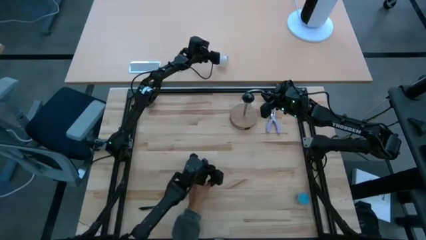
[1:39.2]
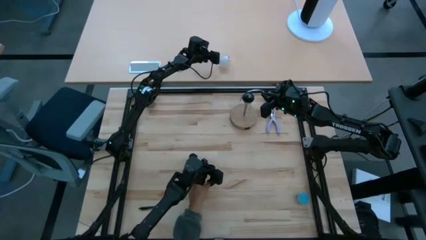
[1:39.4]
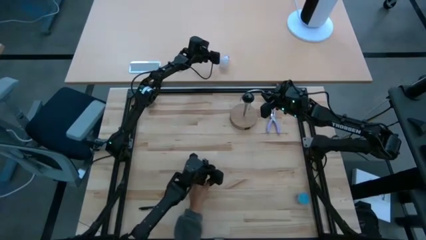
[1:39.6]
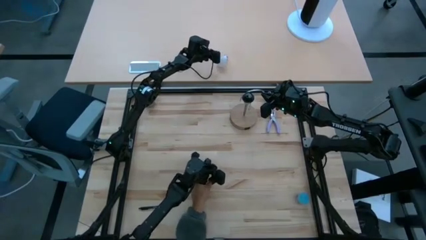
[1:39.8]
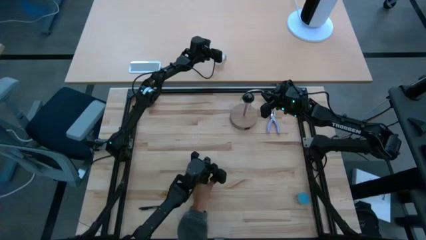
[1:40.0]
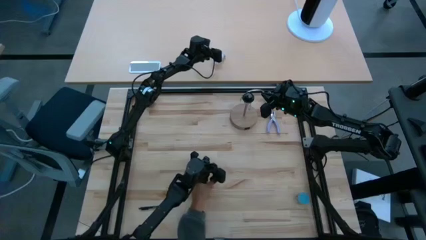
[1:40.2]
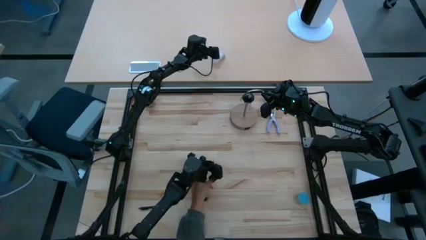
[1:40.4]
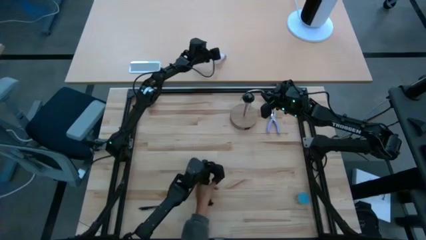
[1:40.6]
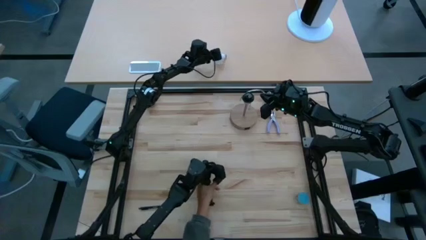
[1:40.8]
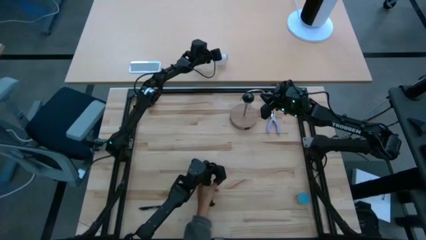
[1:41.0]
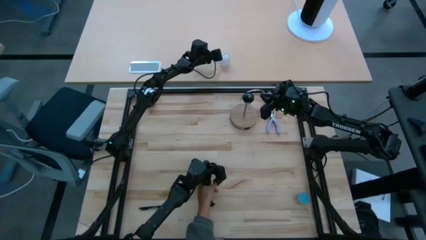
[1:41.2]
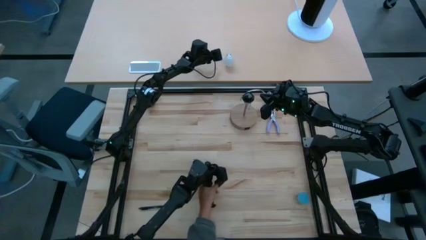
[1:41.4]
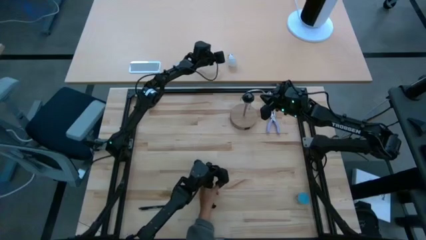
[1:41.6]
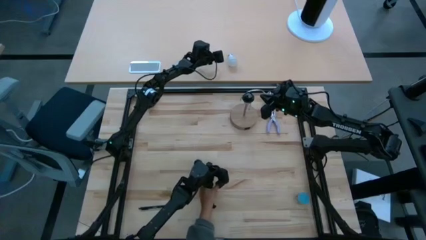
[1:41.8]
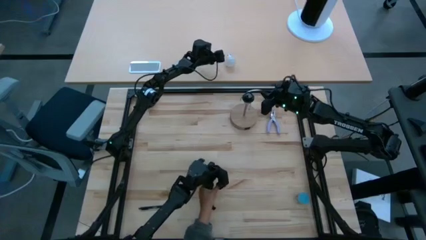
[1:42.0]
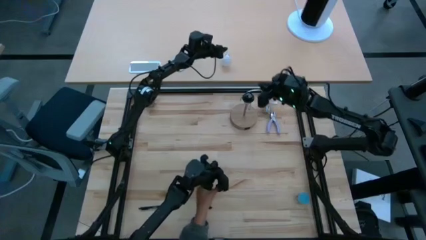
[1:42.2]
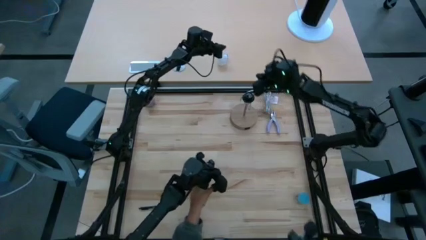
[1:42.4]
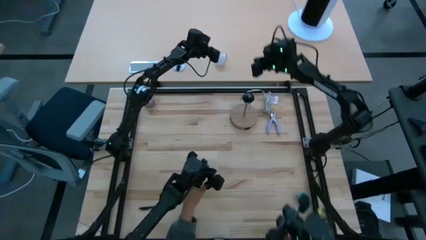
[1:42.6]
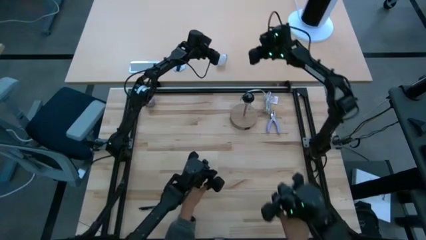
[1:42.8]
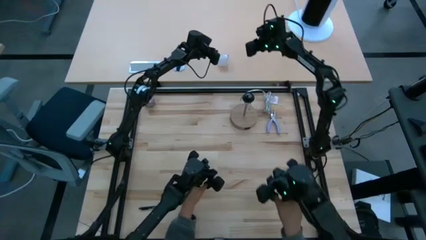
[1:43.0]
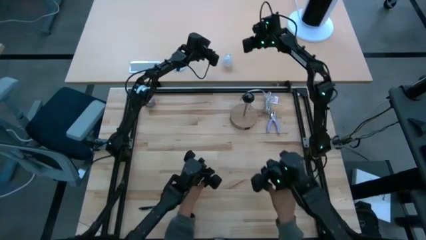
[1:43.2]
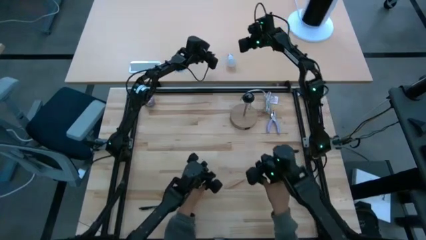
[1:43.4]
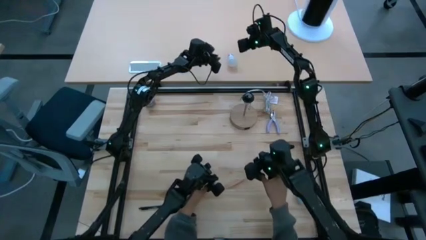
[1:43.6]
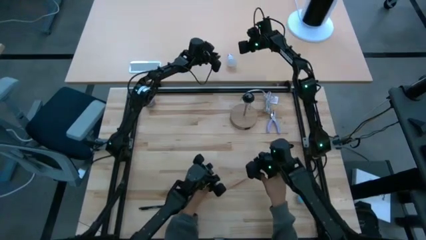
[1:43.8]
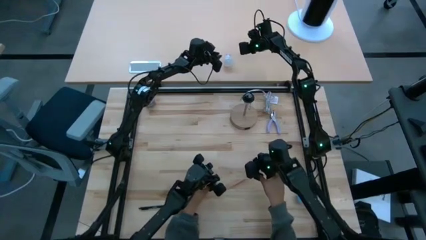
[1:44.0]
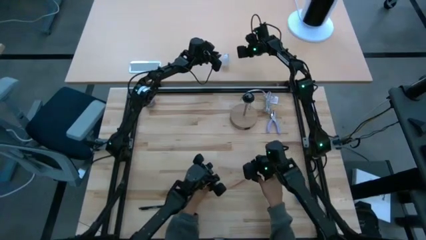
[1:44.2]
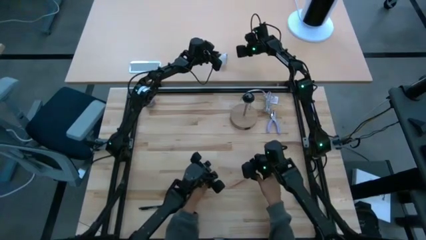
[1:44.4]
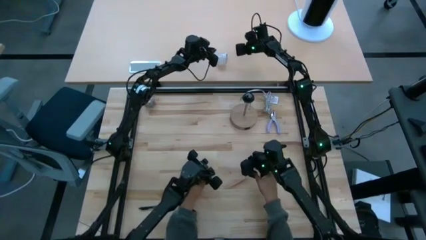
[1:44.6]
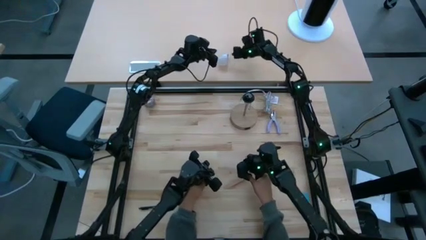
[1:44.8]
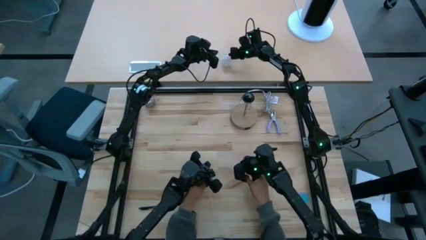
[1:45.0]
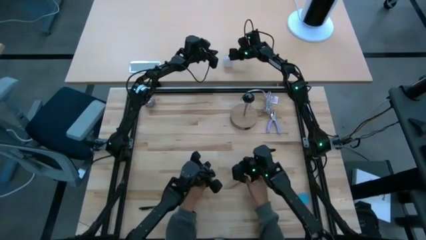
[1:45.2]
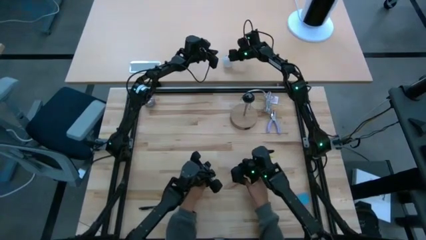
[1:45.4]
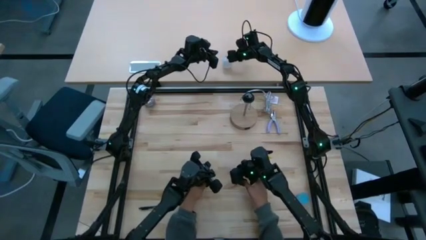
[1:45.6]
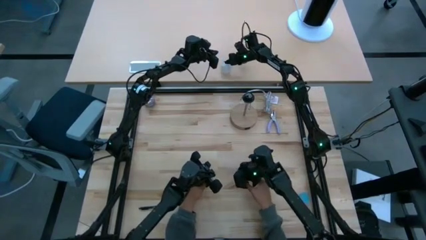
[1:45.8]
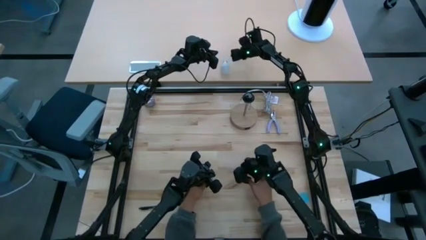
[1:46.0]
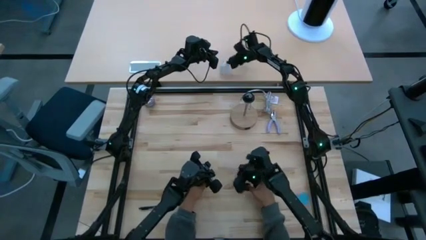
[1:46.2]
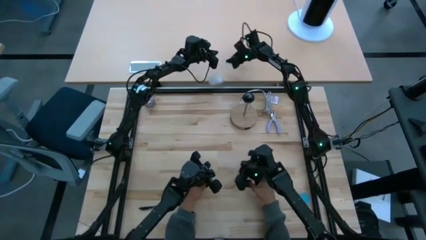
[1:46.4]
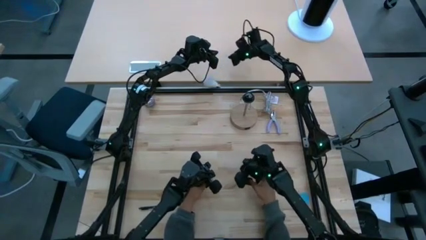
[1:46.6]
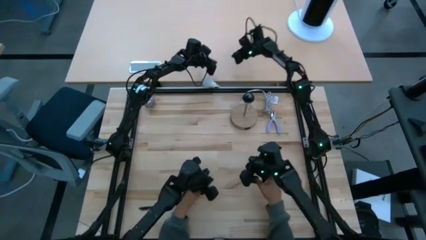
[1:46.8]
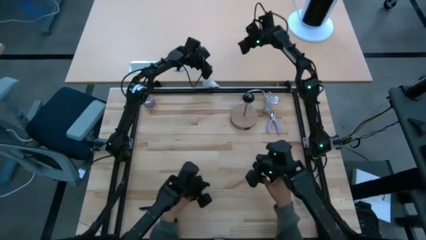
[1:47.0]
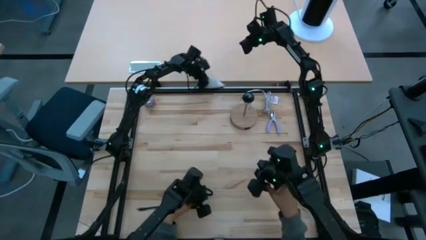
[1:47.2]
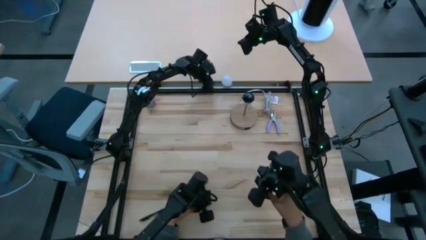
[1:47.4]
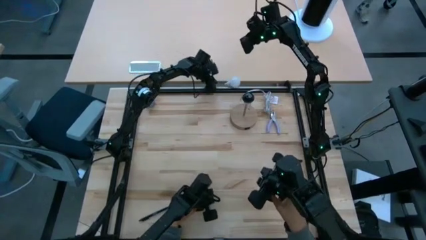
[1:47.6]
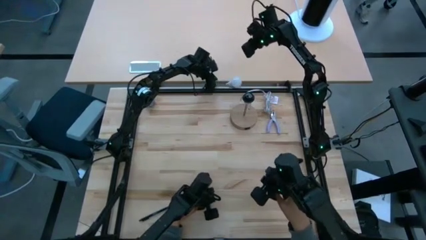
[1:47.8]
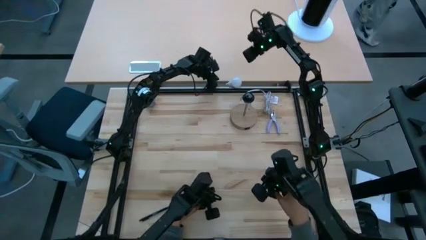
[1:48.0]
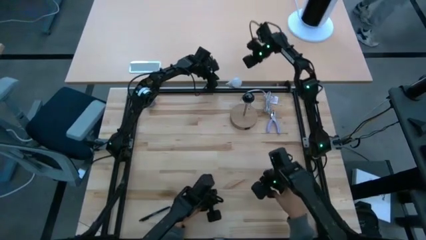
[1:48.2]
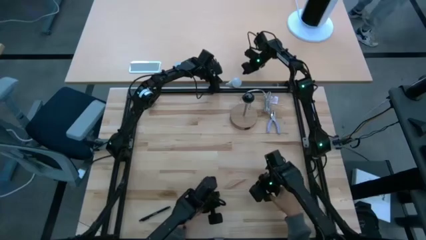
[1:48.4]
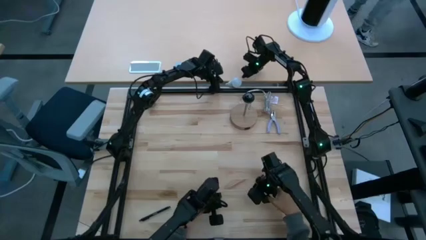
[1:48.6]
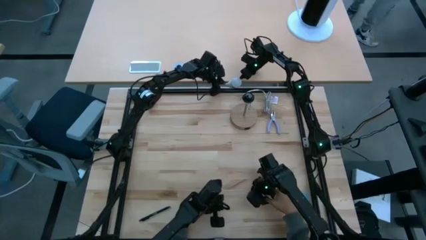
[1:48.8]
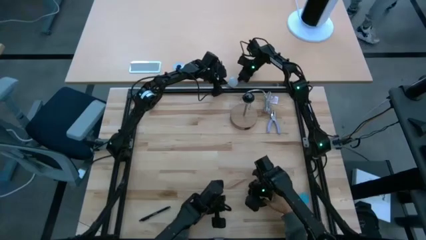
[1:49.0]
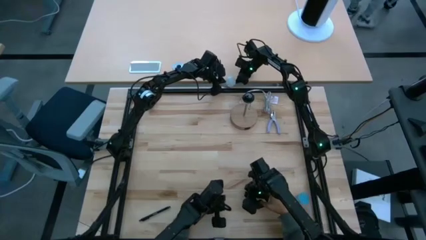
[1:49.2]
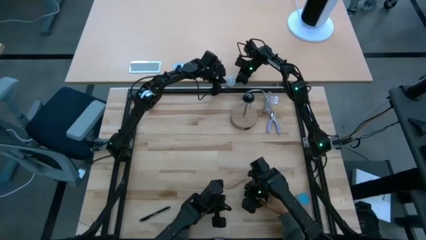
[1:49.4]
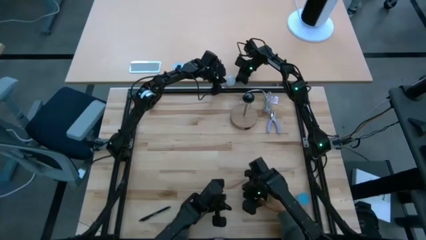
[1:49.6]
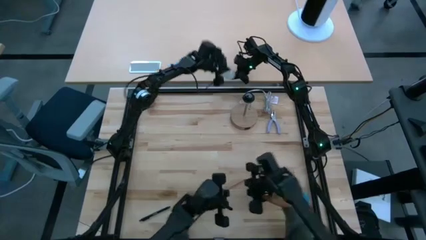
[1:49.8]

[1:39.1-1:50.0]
Task: Screw lightbulb
Move the lightbulb to the table

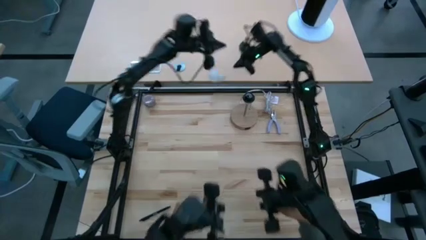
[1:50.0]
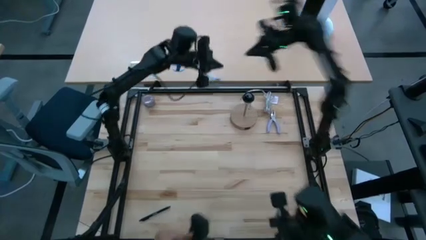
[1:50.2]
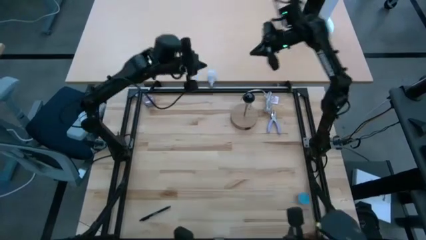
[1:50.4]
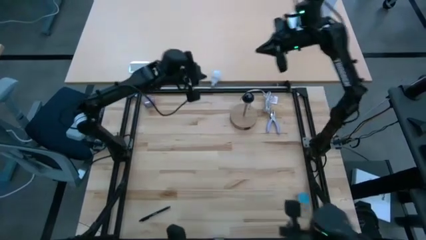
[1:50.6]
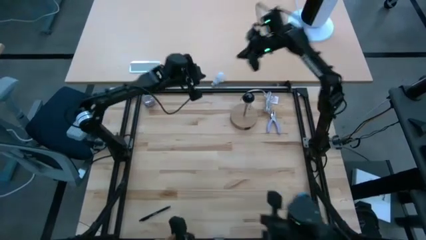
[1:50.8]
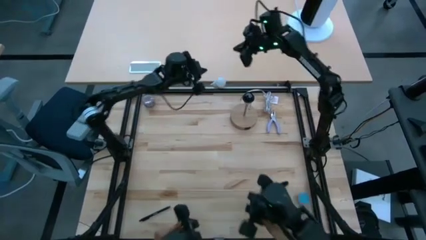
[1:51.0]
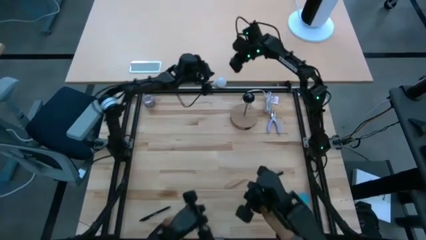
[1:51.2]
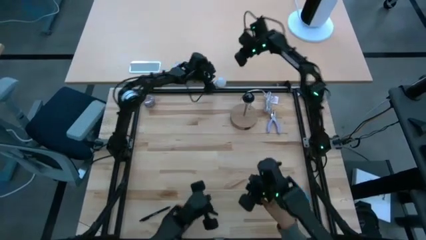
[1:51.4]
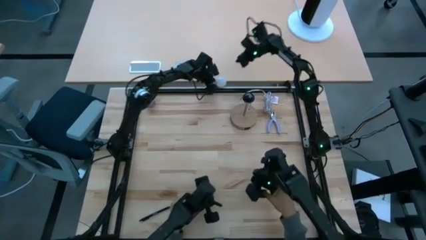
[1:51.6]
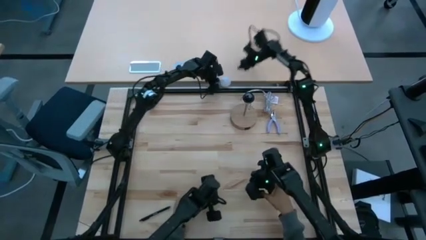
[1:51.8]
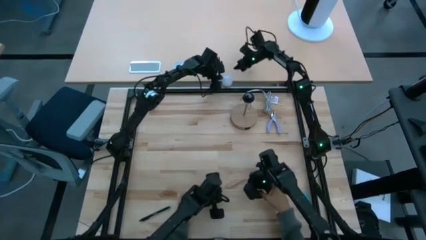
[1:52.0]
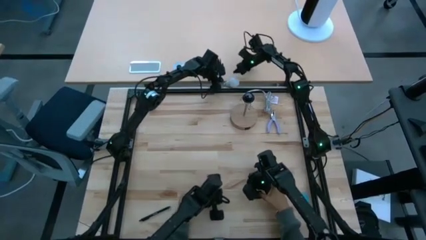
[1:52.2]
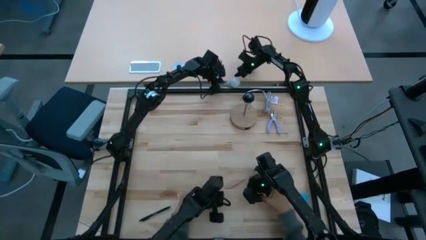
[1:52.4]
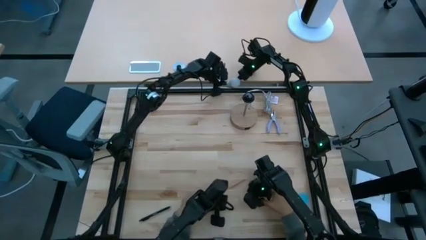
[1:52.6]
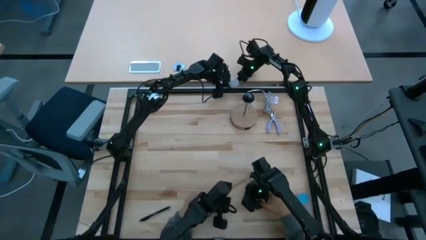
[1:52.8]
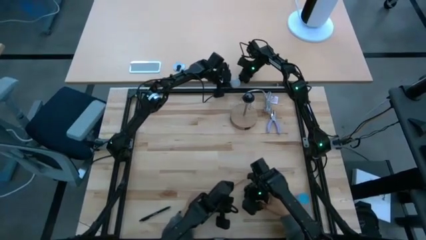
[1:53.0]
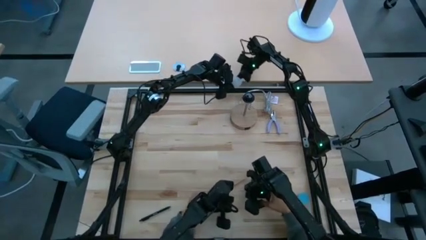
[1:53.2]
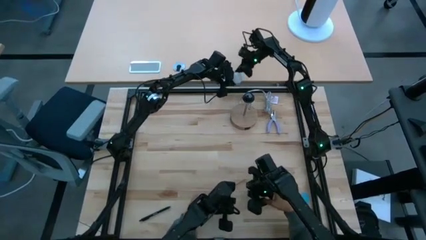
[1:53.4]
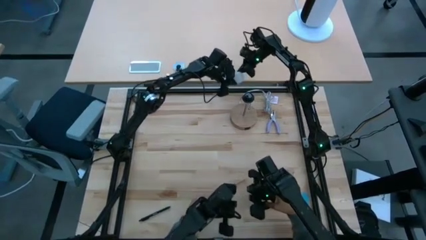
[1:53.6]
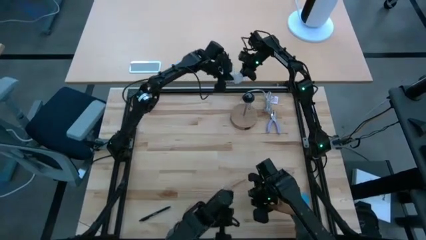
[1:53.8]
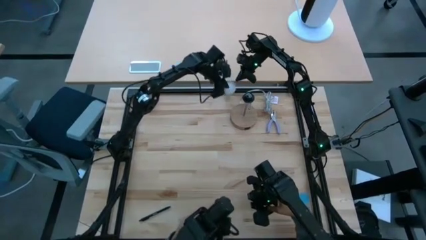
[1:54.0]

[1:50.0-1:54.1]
Move the lightbulb to the table

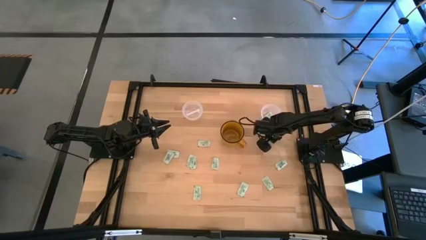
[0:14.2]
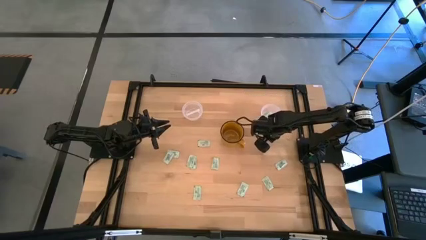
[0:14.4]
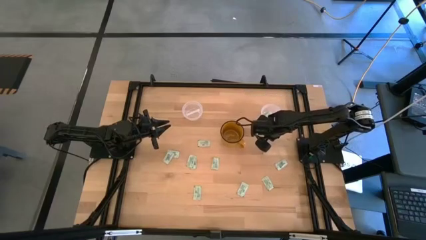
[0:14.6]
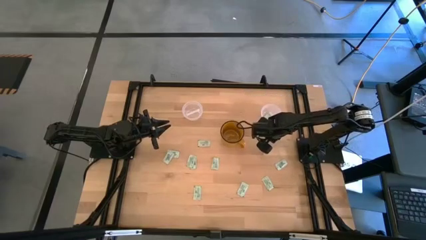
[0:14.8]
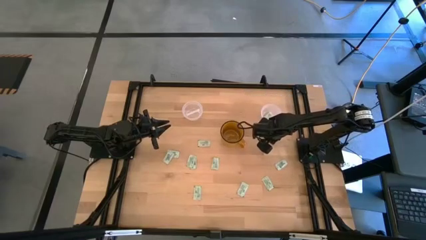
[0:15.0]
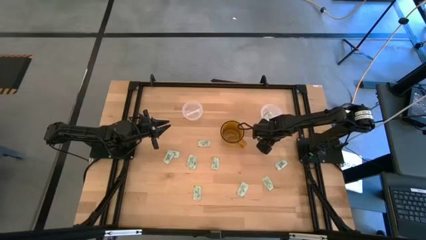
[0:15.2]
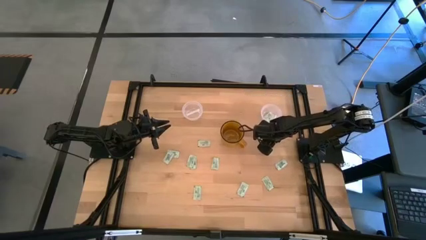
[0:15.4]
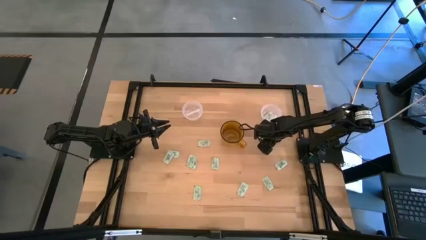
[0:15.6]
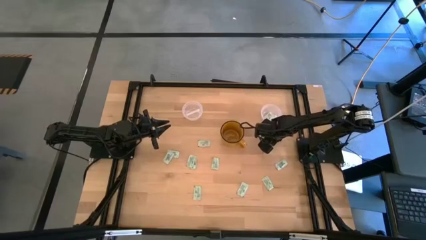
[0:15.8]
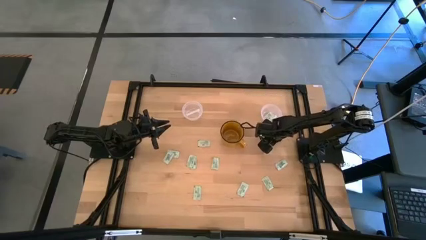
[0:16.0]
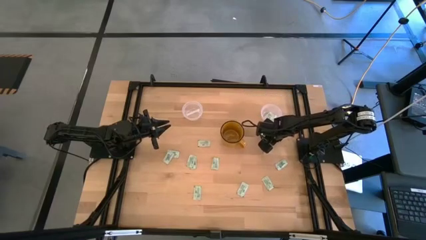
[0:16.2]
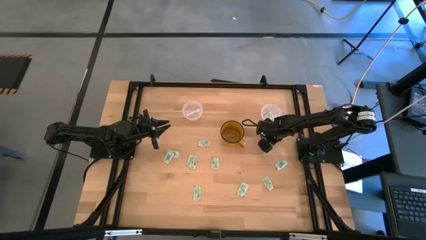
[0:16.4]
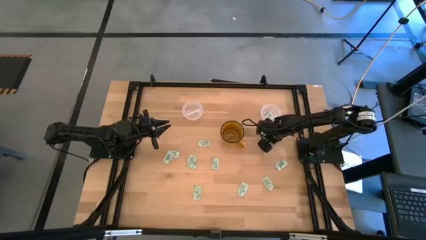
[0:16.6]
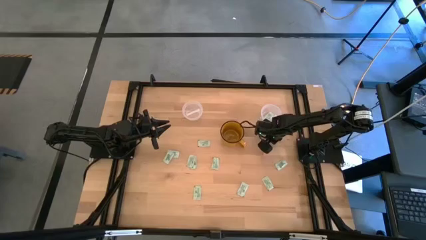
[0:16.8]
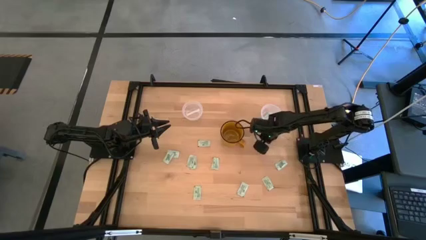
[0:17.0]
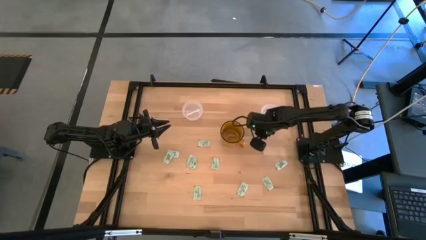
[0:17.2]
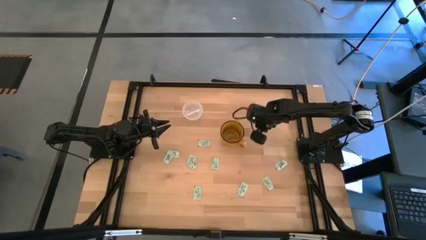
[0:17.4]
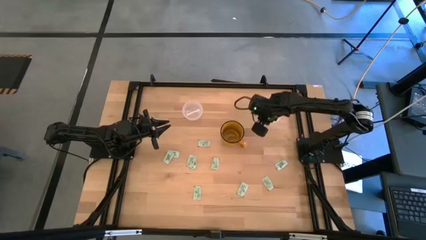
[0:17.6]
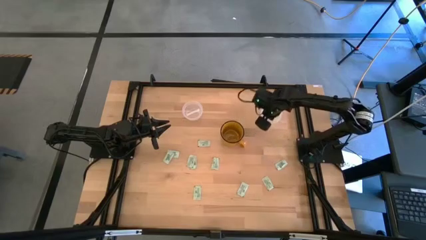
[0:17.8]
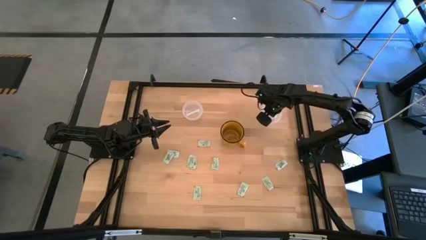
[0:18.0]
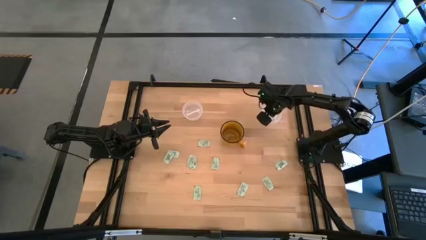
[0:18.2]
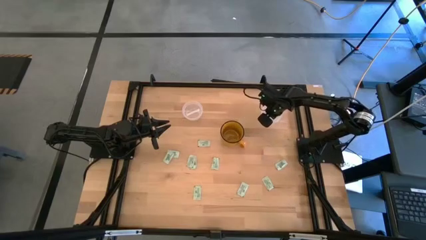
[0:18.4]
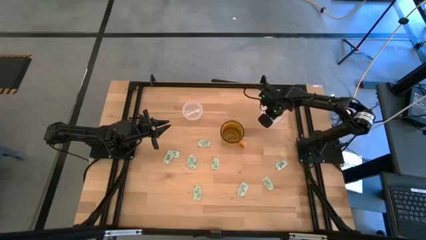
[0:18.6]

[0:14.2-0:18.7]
Task: Pick and place Stevia / Truvia into bins
Put the white stevia packet into the right transparent container
